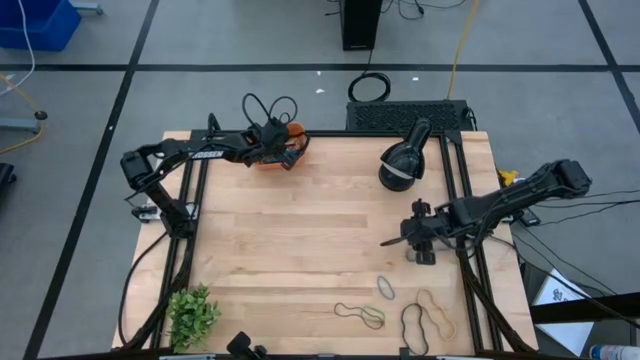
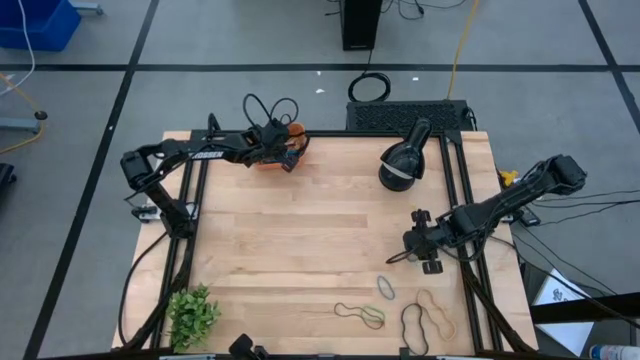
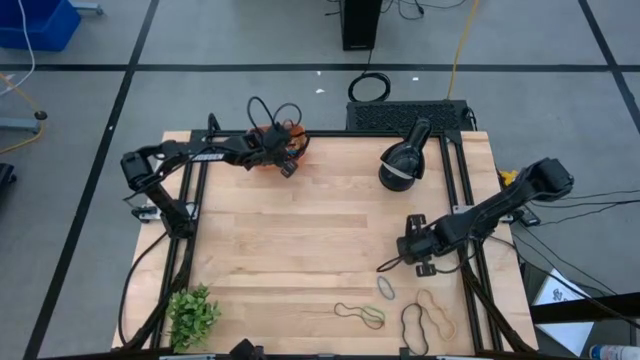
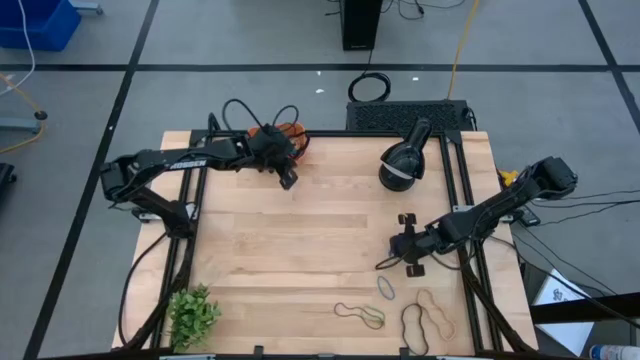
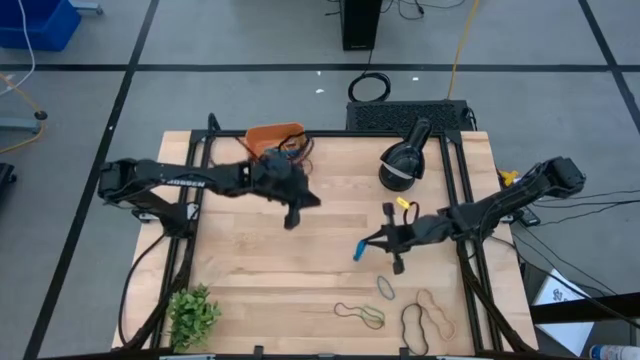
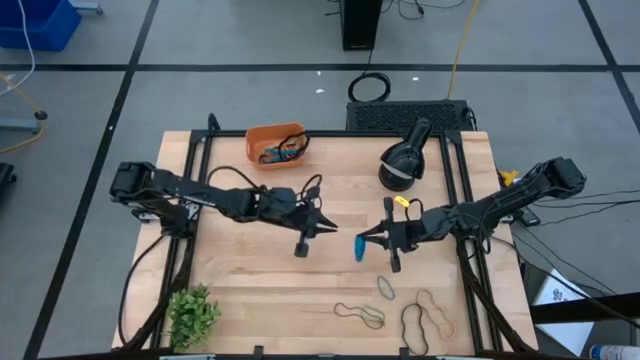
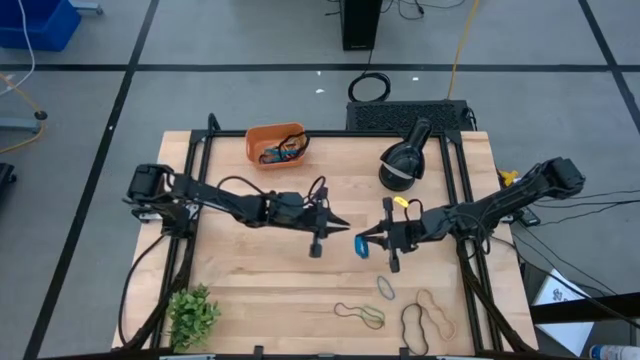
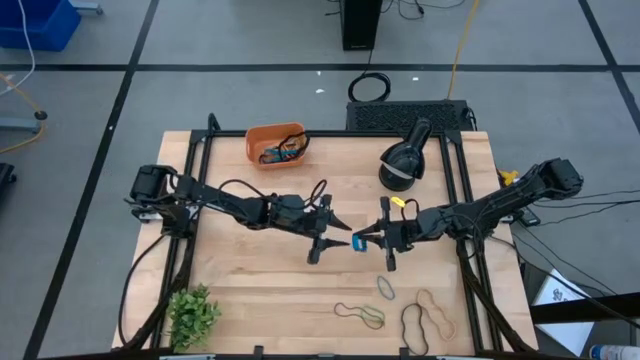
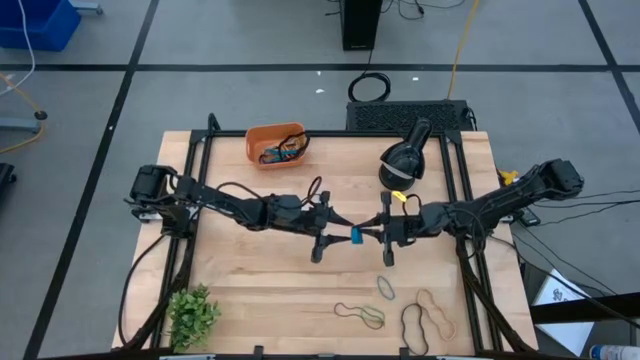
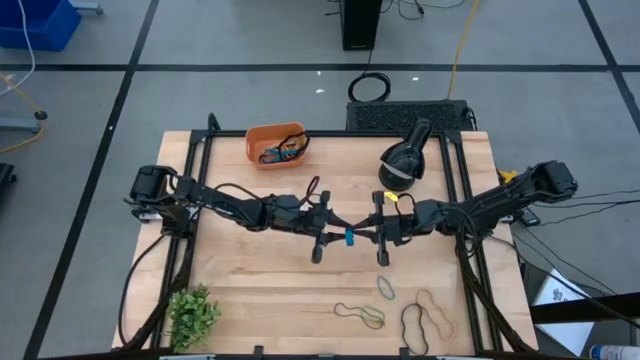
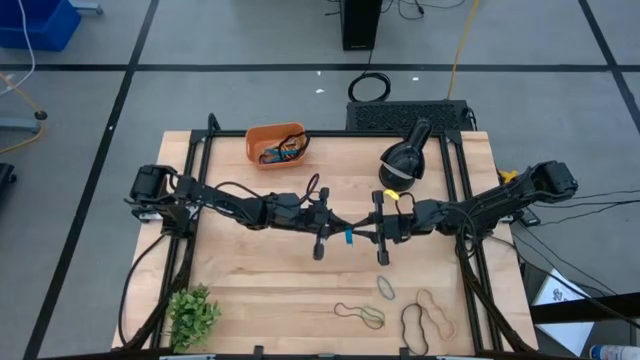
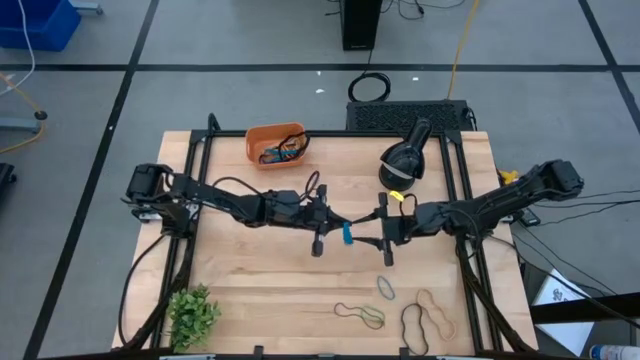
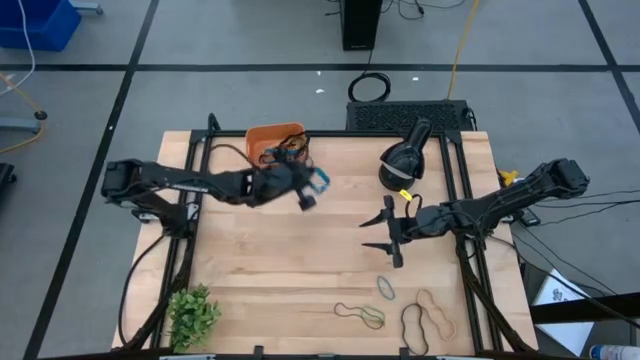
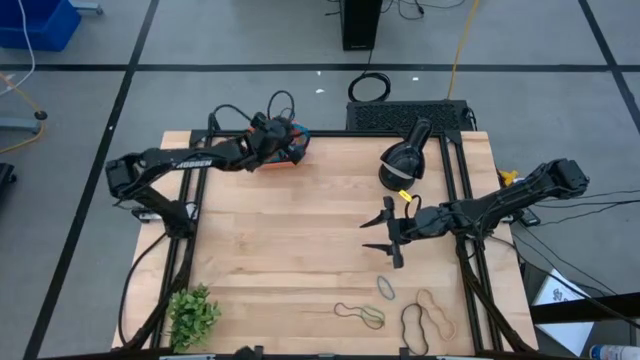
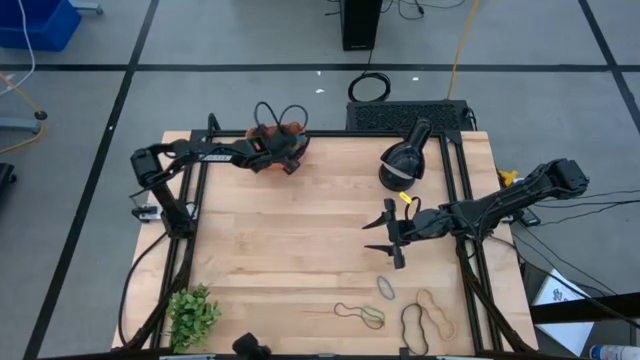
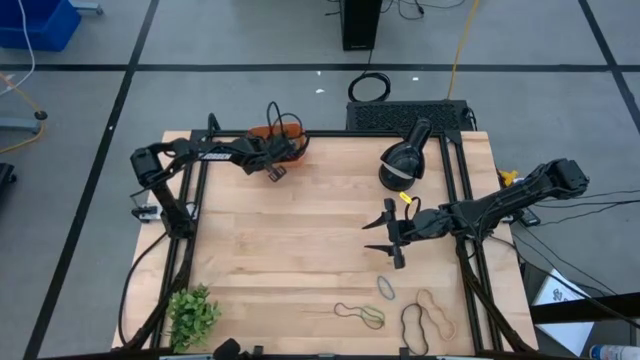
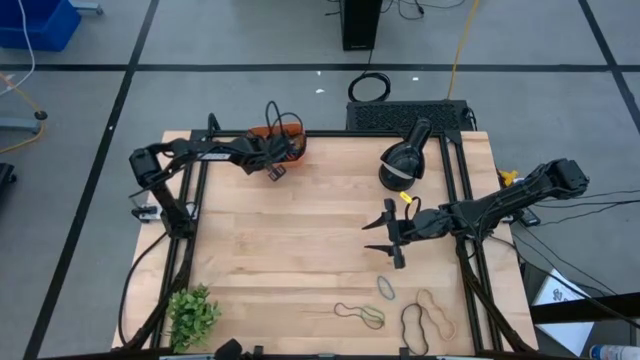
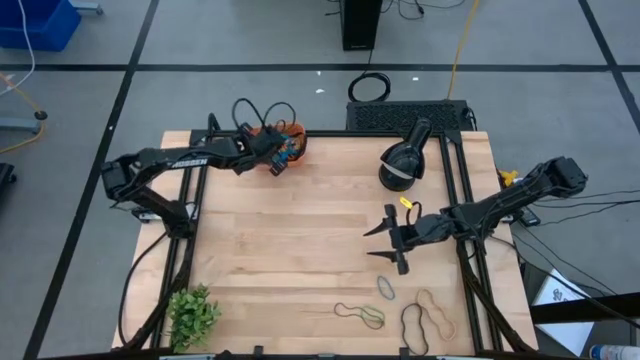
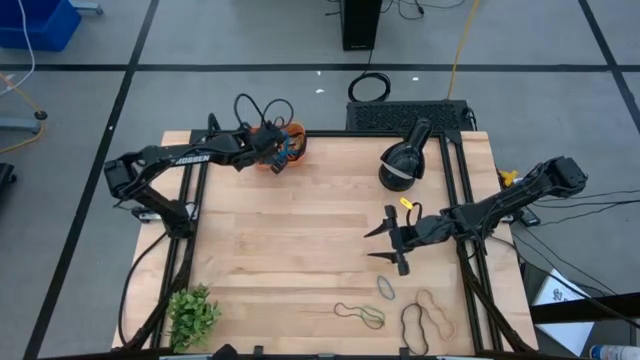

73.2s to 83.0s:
Task: Pick and place rubber bands into bin
Put the top blue rubber band into the orange container

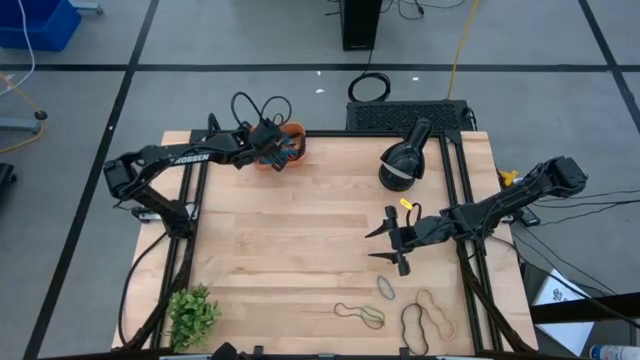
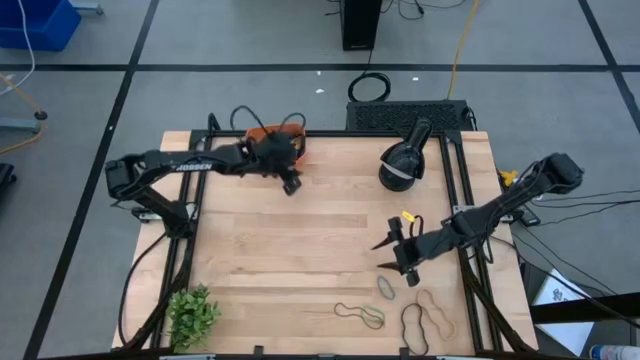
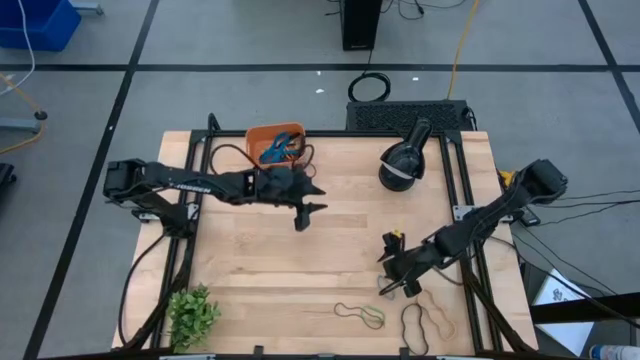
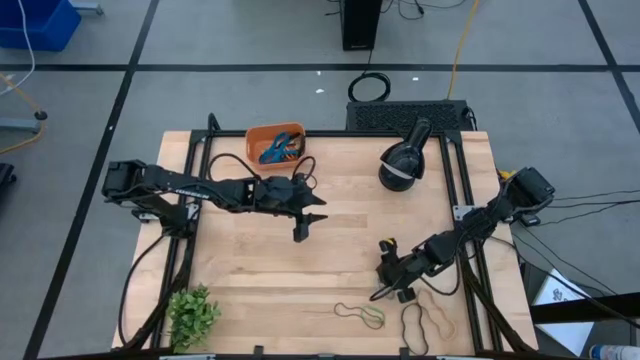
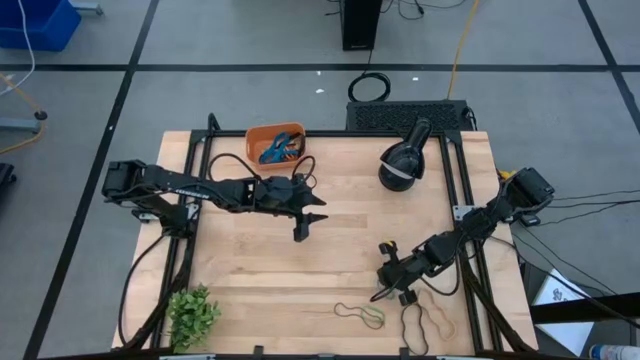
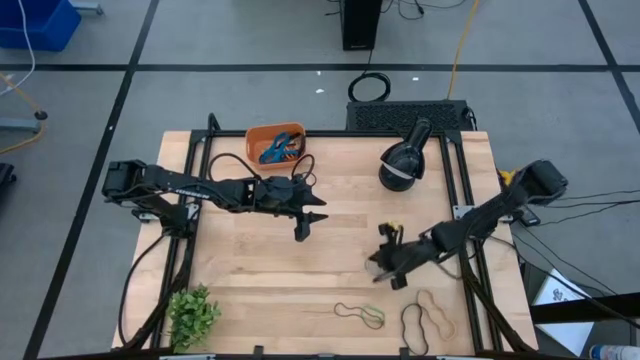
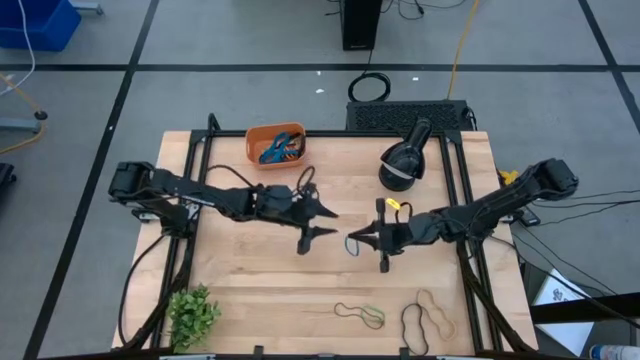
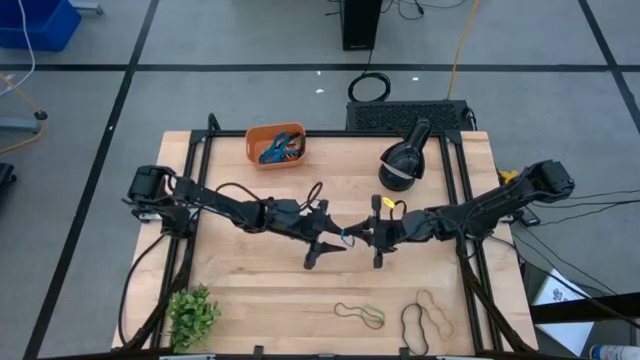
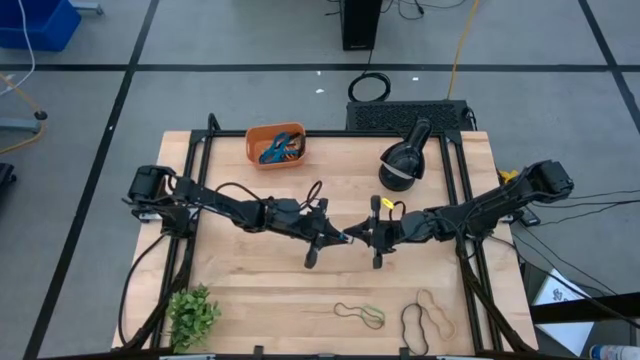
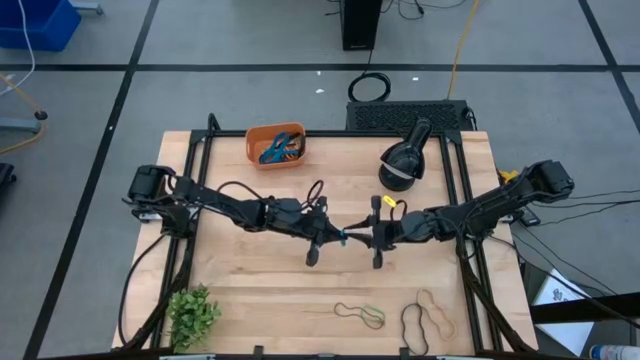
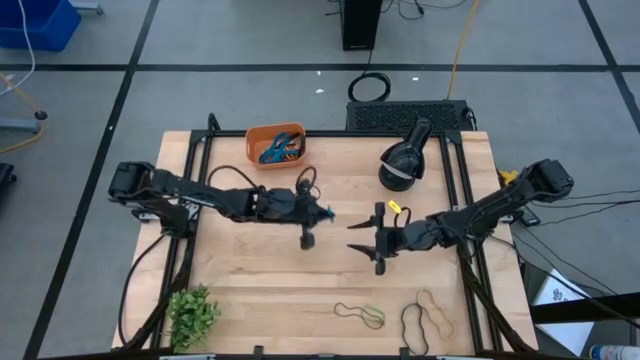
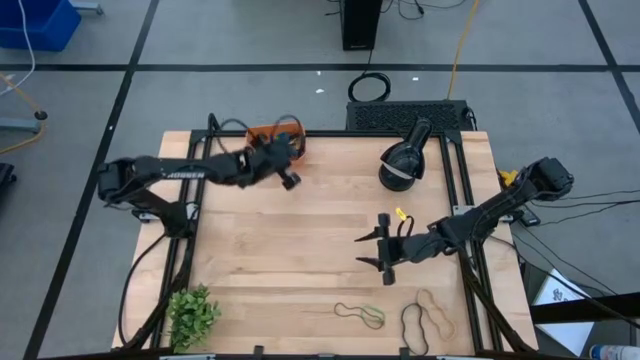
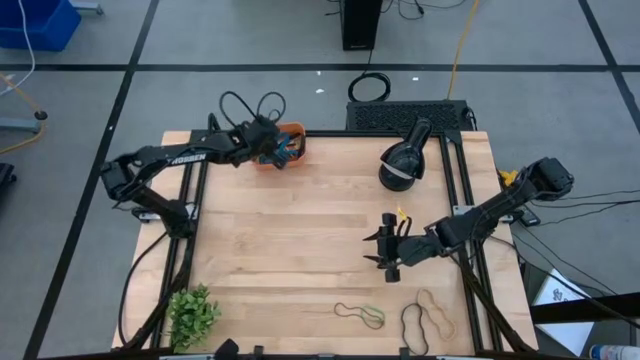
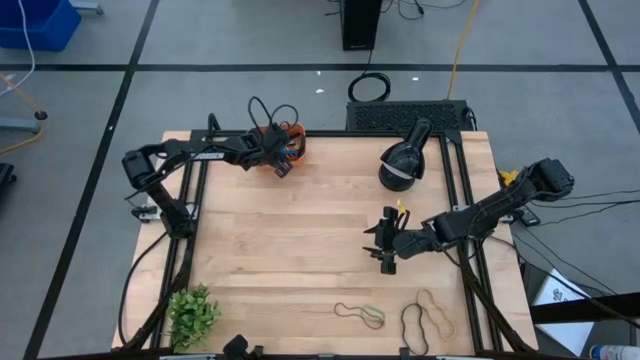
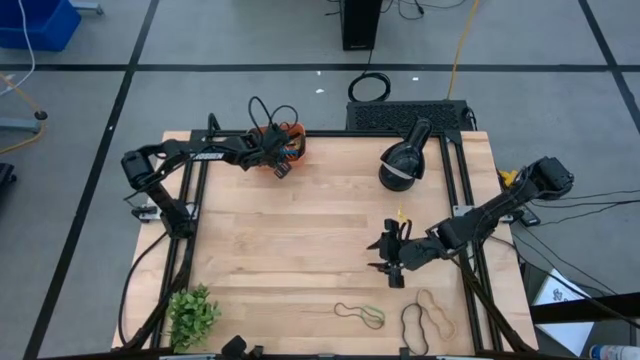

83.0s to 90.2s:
Put the blue rubber band into the orange container

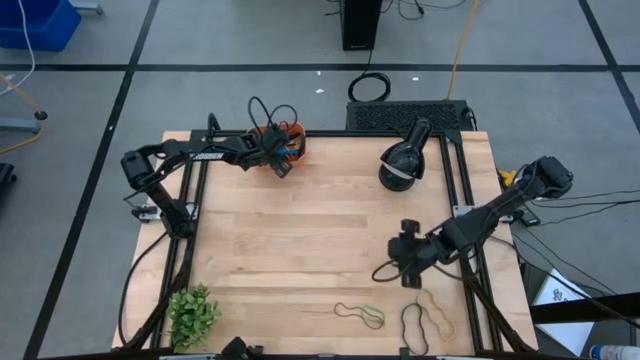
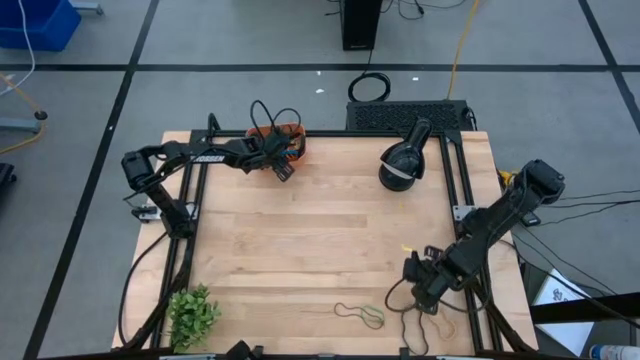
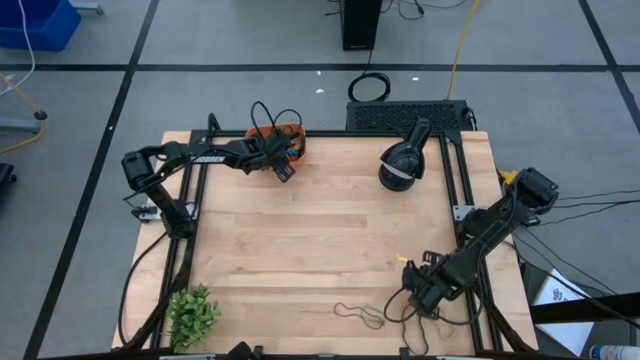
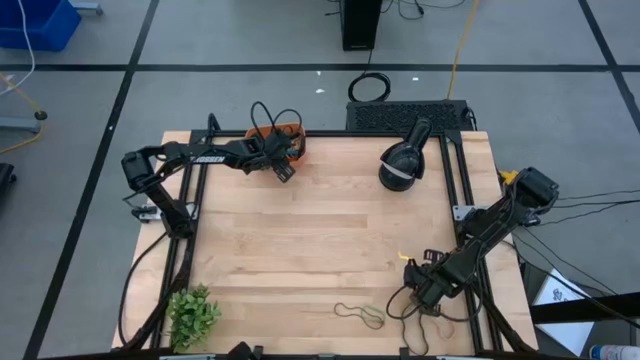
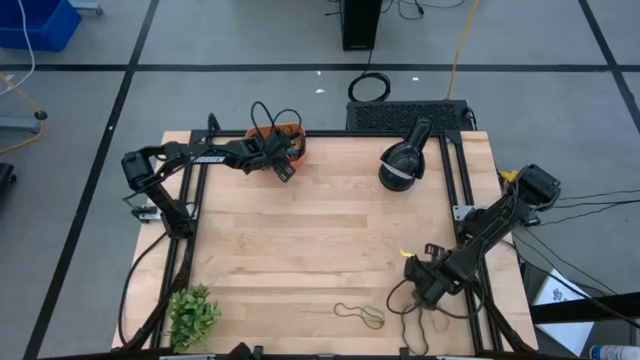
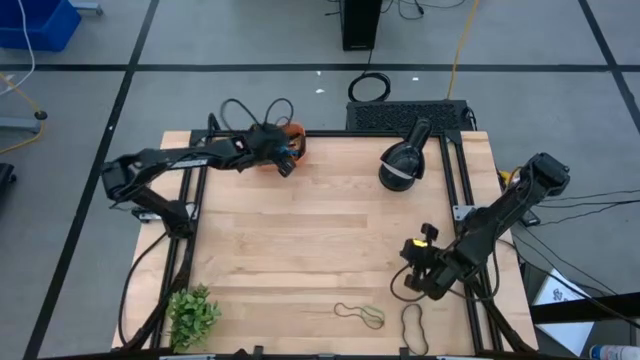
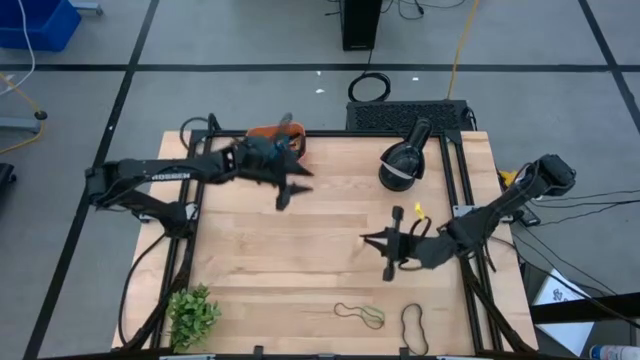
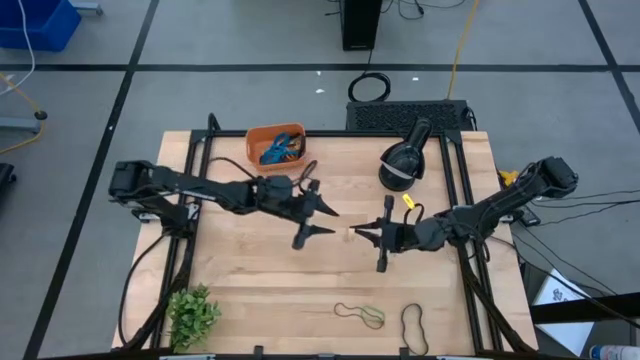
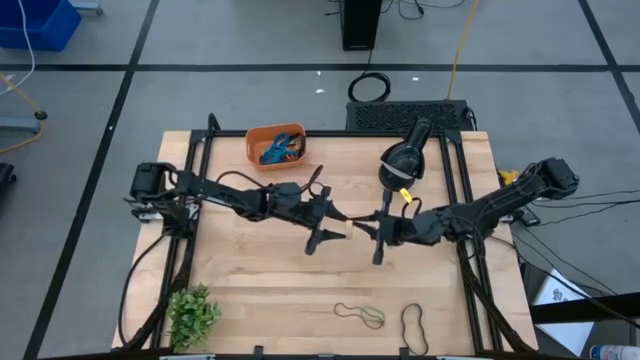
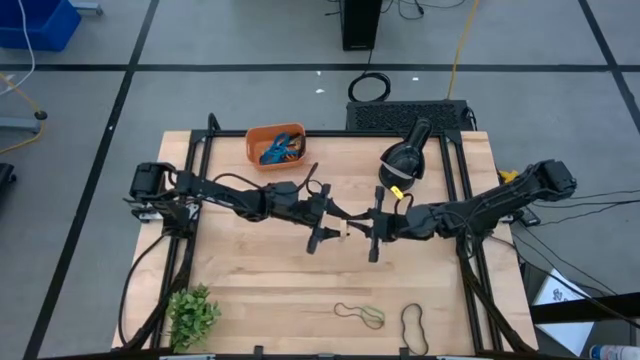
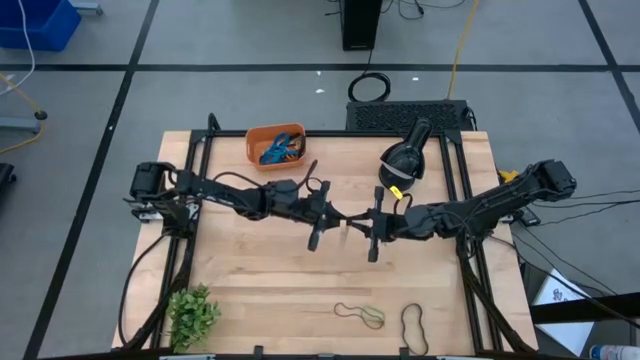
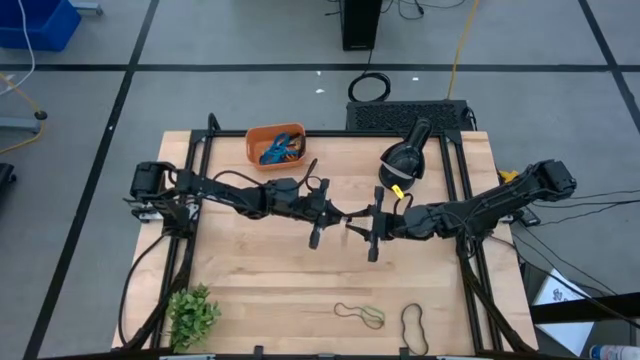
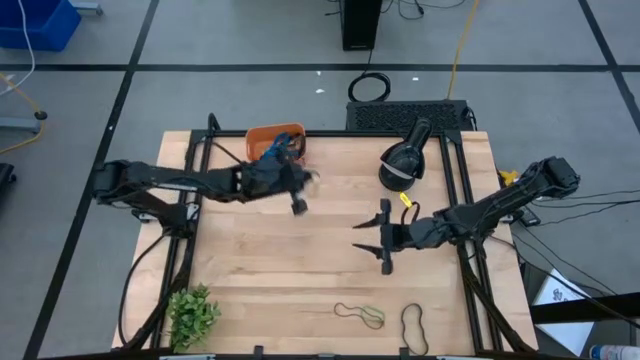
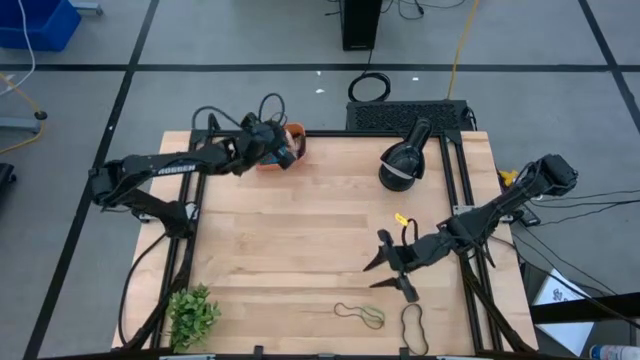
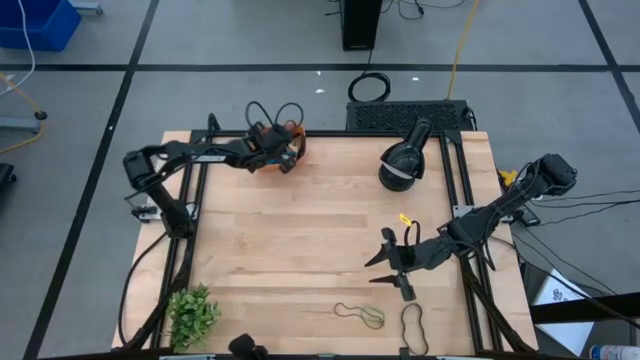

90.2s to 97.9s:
Put the white rubber band into the orange container
